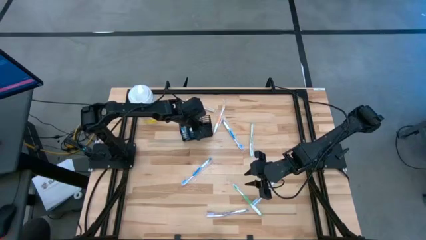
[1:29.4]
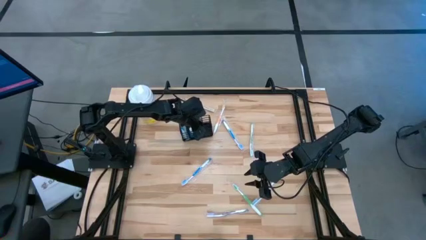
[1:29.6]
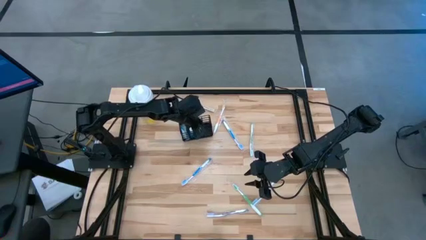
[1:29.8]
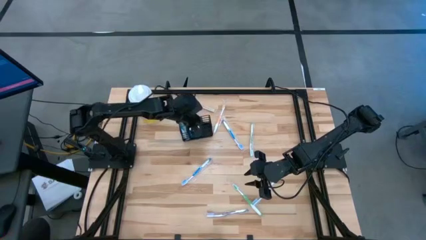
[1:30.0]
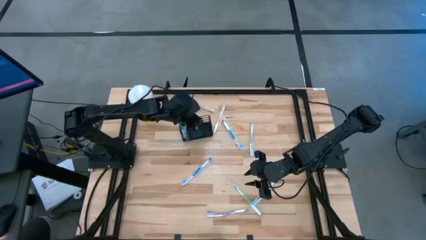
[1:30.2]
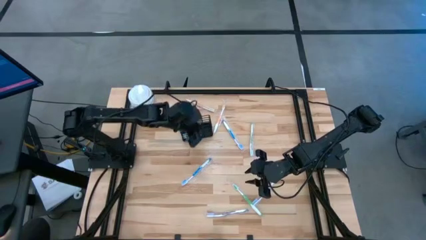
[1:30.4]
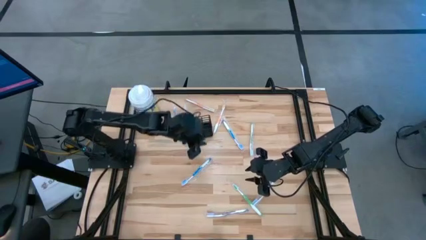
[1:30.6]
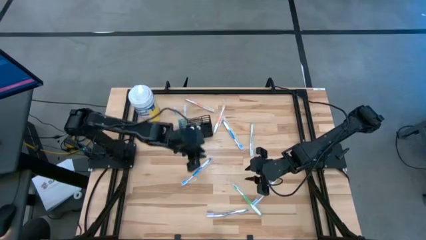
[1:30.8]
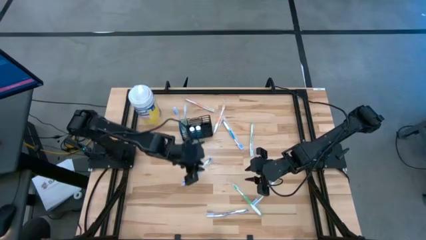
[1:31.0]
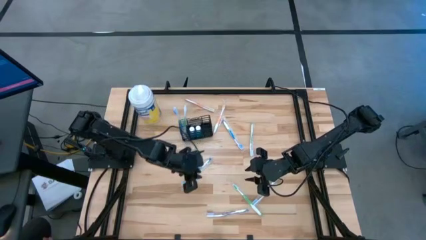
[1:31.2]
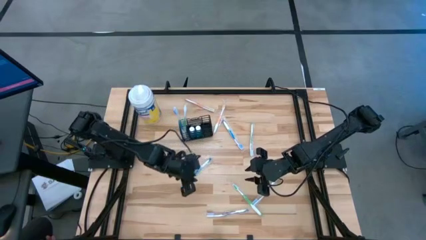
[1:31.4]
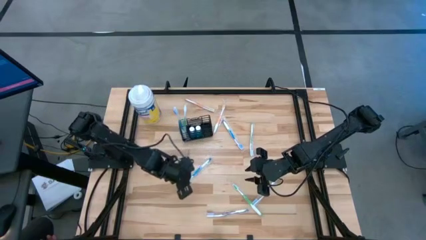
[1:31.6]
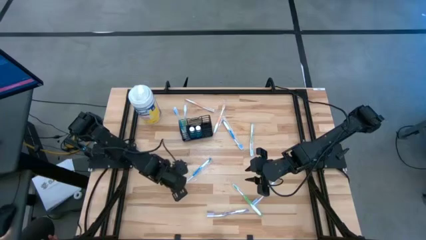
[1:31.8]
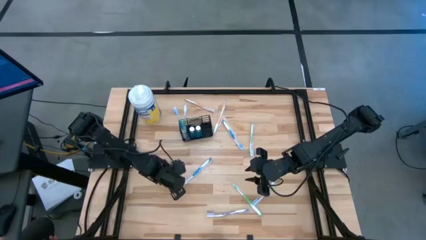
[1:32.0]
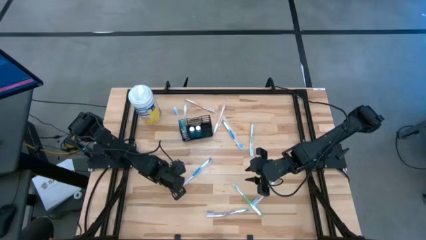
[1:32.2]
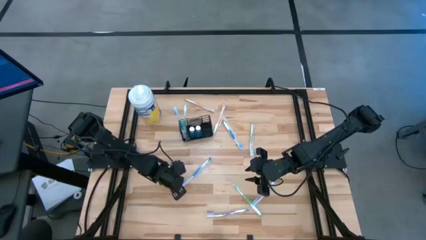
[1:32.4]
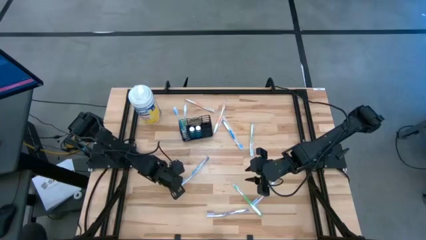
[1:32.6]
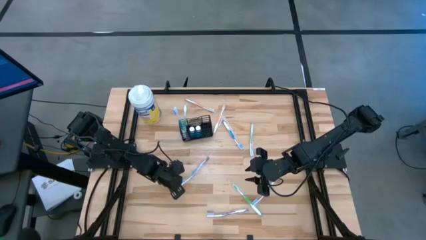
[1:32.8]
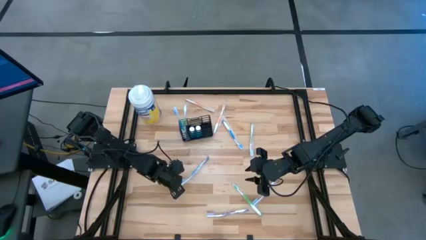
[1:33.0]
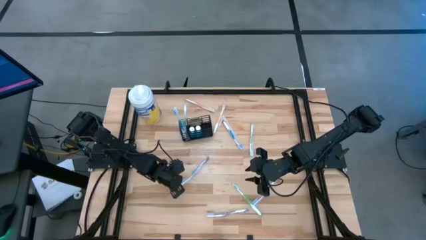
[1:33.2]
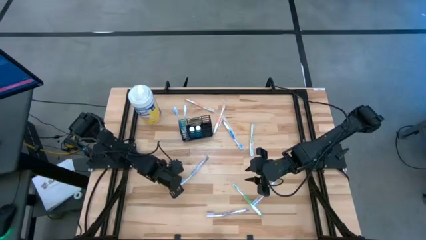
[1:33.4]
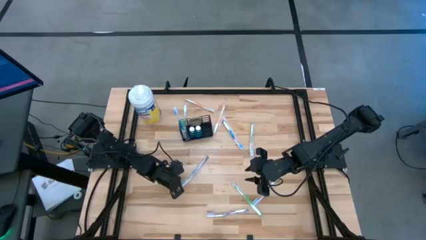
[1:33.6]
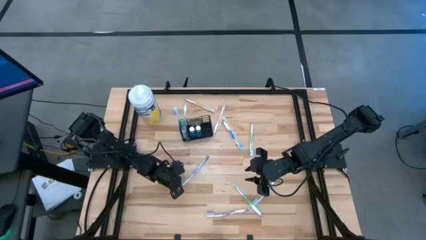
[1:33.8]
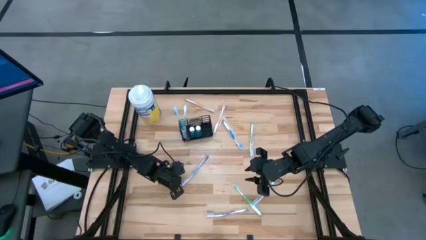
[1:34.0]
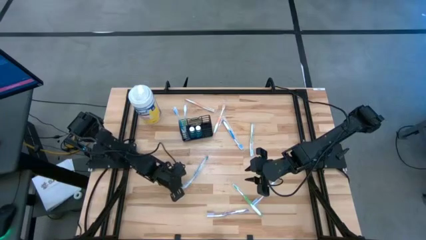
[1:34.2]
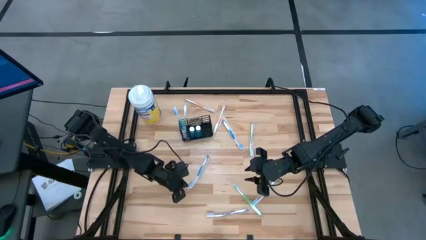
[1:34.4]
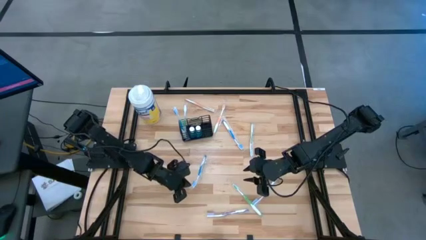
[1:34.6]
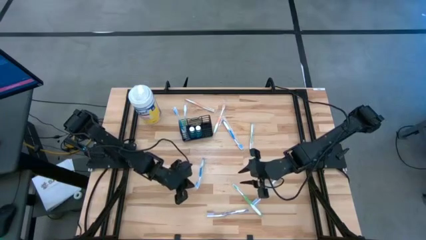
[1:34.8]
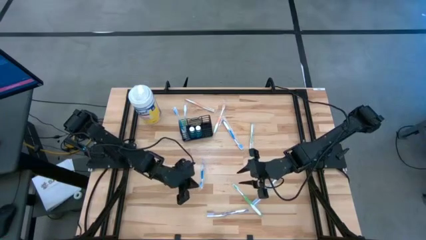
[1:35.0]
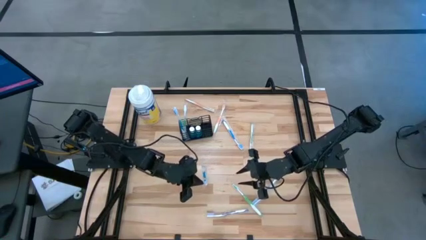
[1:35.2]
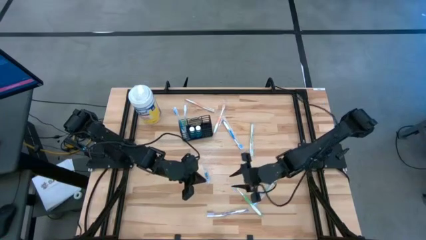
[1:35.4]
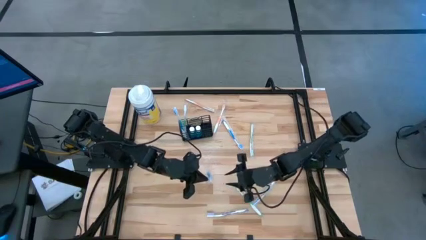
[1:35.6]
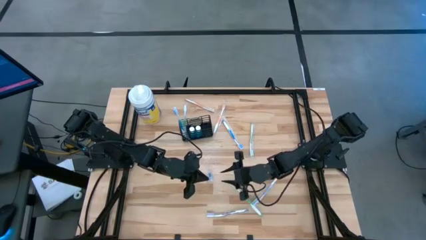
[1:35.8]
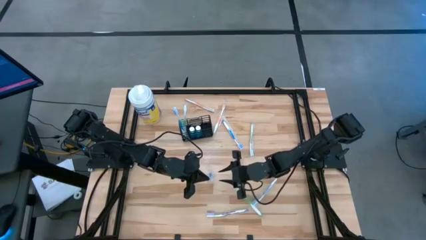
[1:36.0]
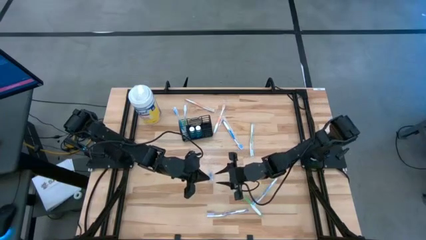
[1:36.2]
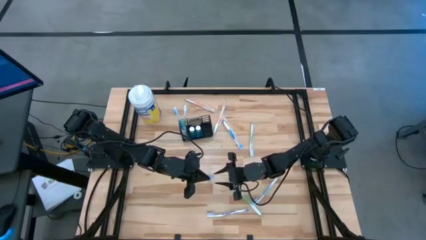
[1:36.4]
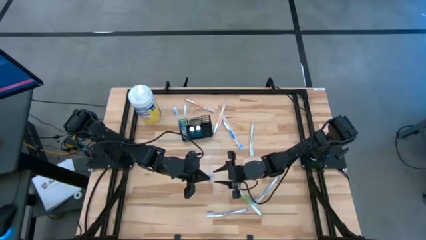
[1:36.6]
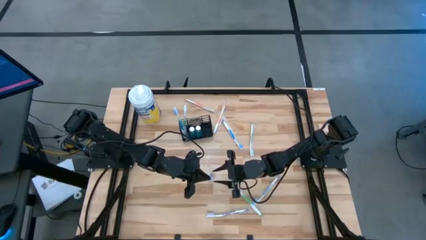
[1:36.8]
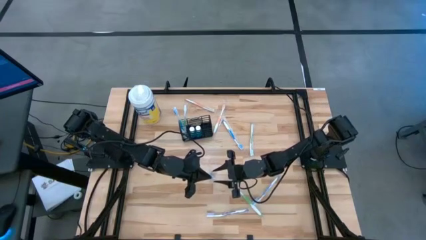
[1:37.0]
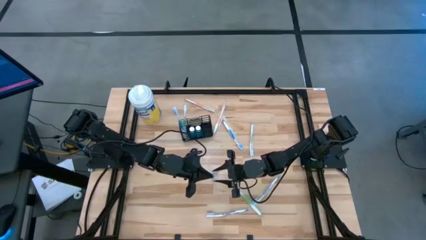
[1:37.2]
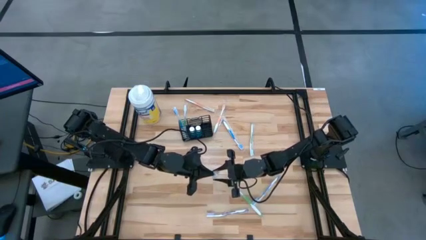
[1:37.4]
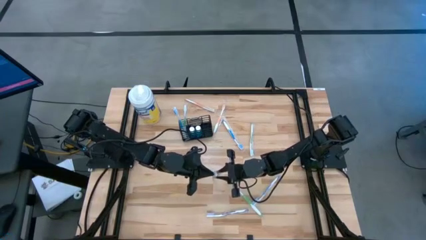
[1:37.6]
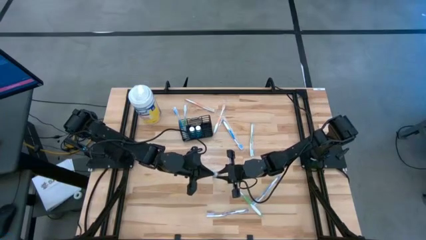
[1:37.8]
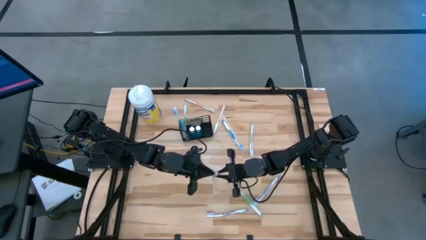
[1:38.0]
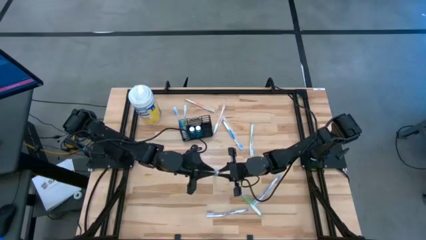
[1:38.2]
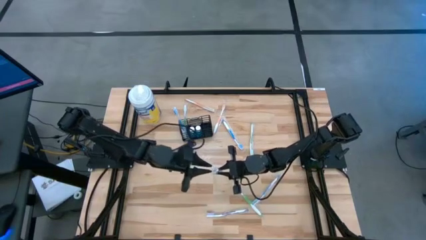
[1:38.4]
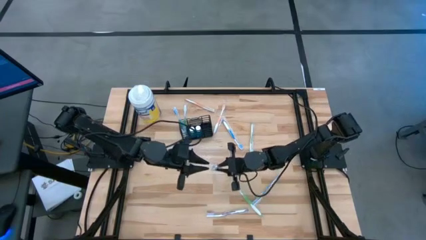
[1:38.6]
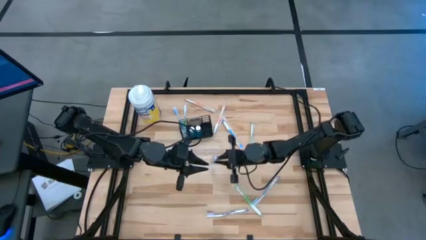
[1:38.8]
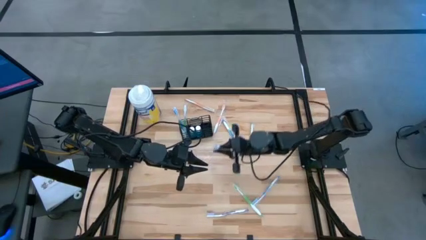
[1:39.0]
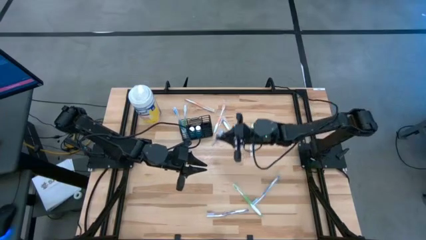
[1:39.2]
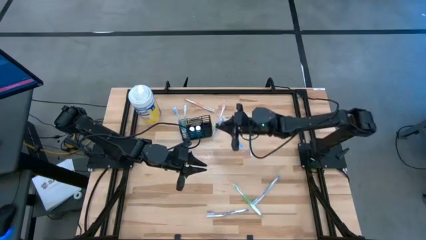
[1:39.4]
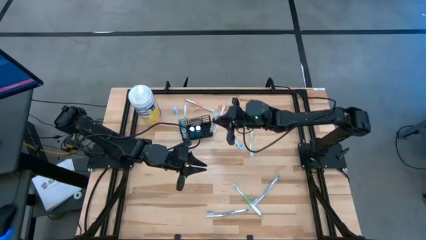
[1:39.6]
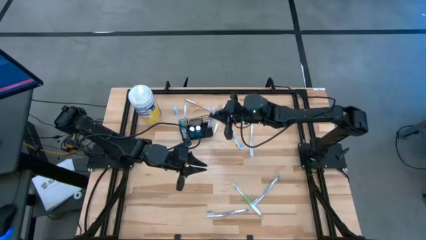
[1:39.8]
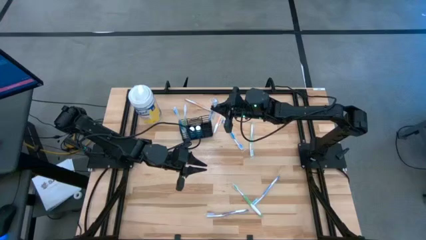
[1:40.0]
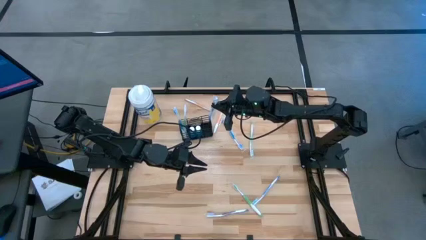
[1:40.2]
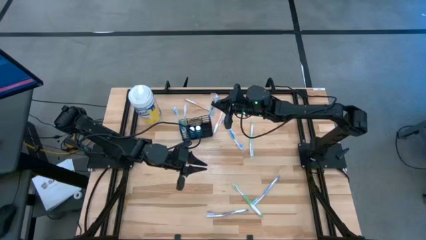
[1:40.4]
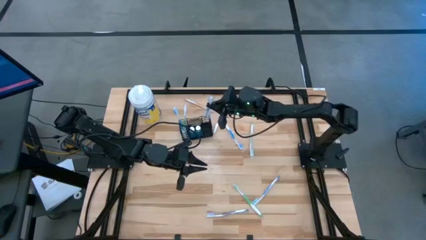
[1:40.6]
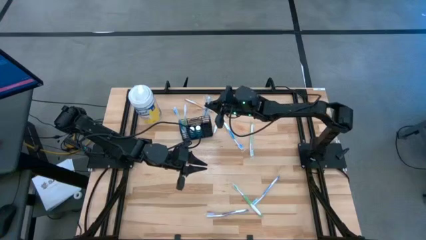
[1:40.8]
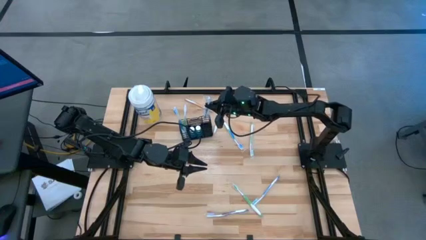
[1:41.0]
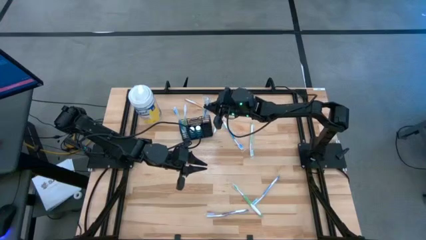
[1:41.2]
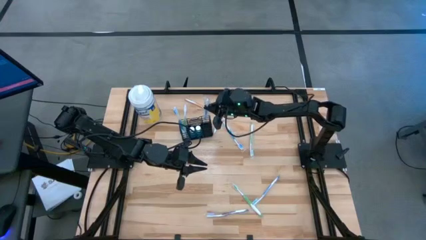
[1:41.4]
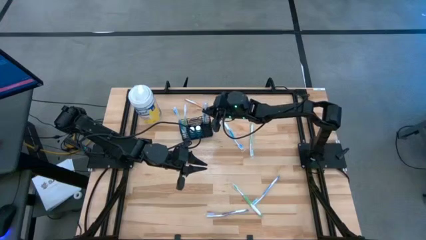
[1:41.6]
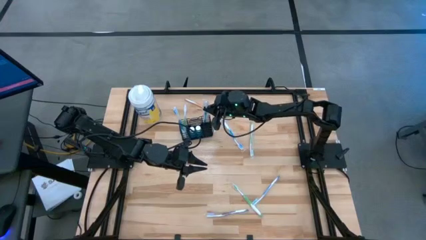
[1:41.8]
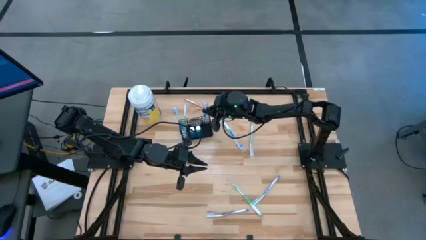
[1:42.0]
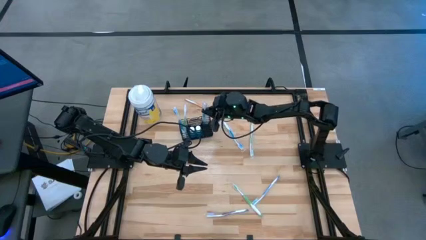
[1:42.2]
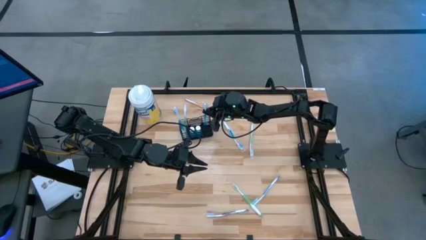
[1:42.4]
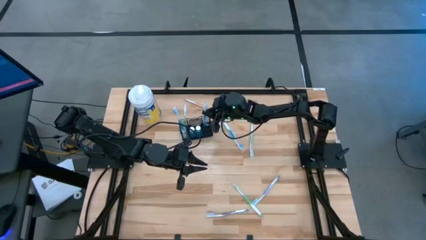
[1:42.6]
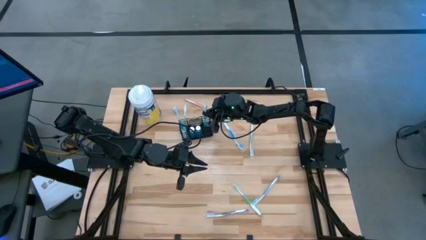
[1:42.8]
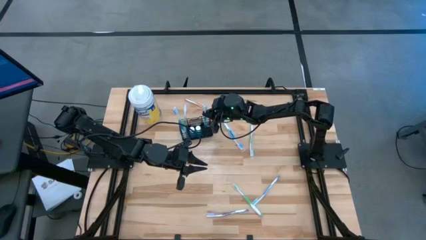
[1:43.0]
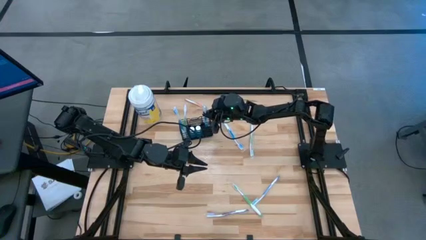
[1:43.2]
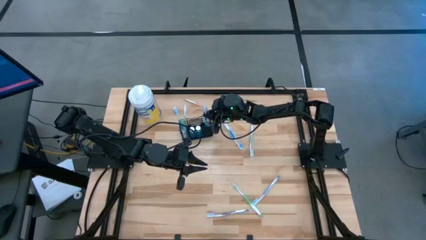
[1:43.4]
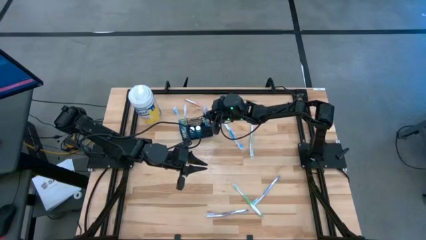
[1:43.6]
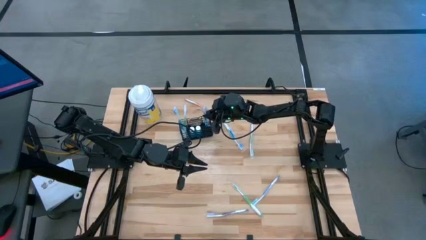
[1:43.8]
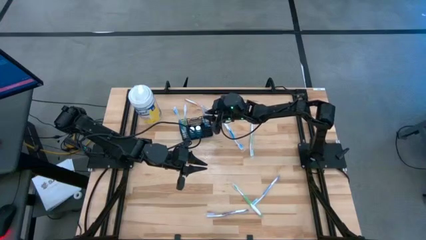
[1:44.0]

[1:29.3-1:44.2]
Task: Pick & Place toothbrushing station
Put the middle blue toothbrush into the mesh organizer
